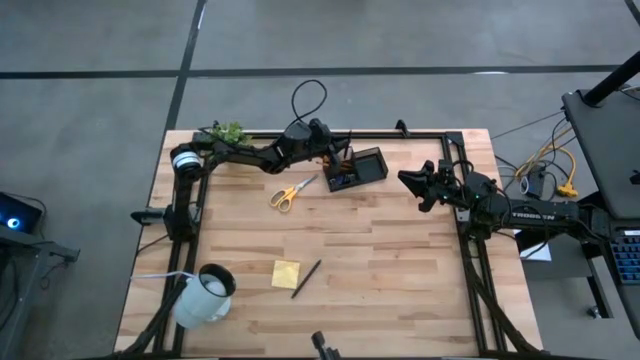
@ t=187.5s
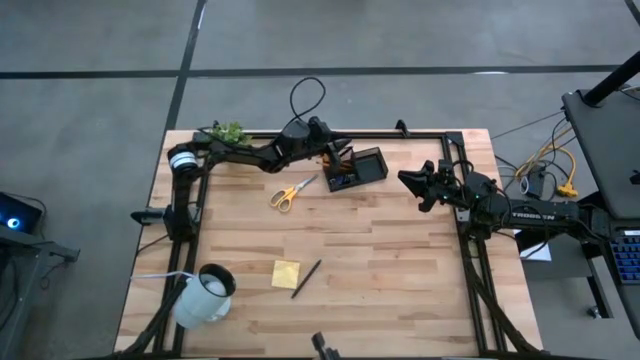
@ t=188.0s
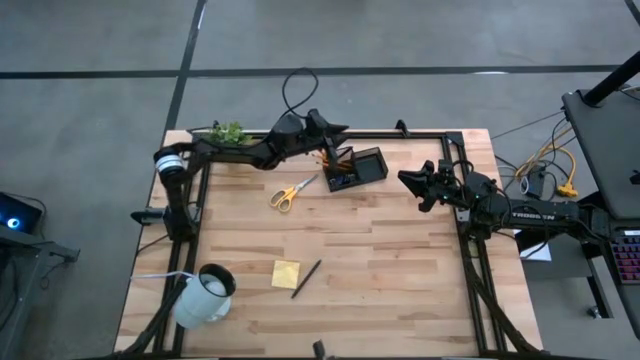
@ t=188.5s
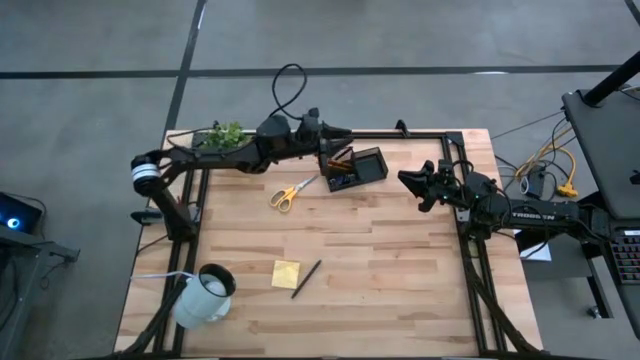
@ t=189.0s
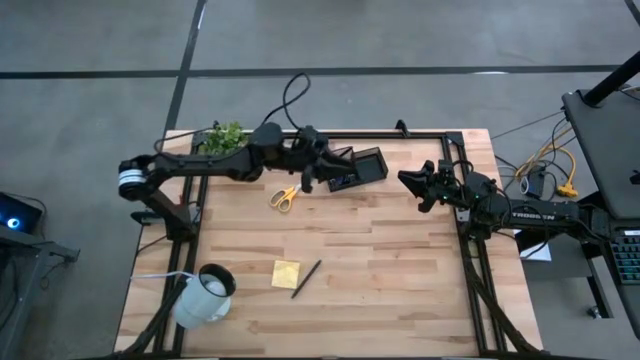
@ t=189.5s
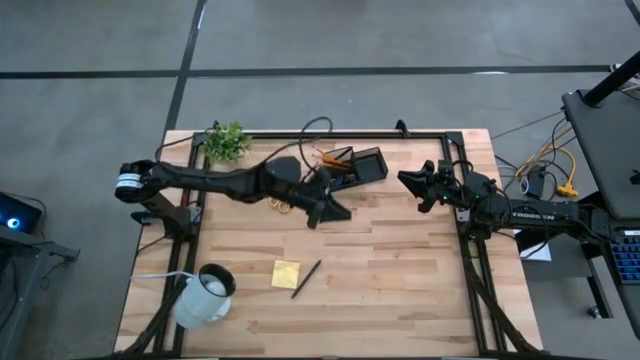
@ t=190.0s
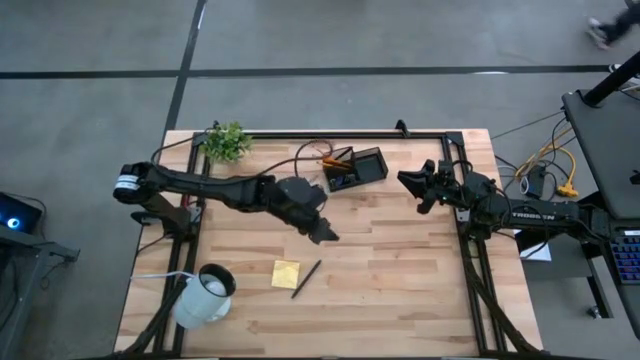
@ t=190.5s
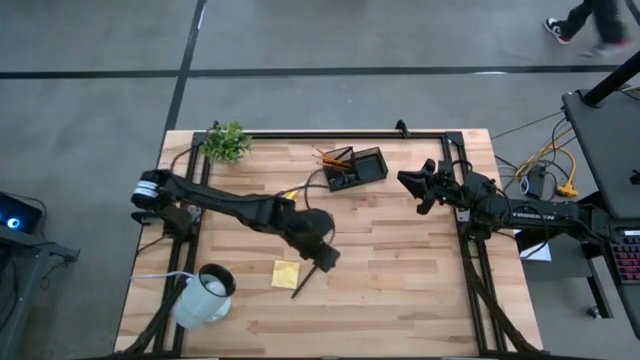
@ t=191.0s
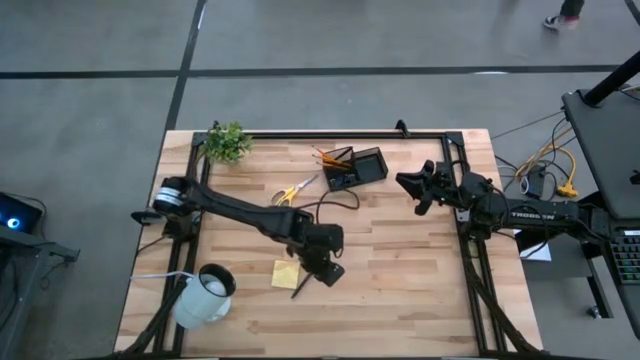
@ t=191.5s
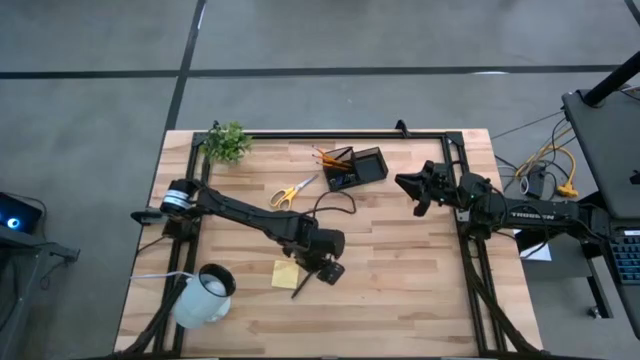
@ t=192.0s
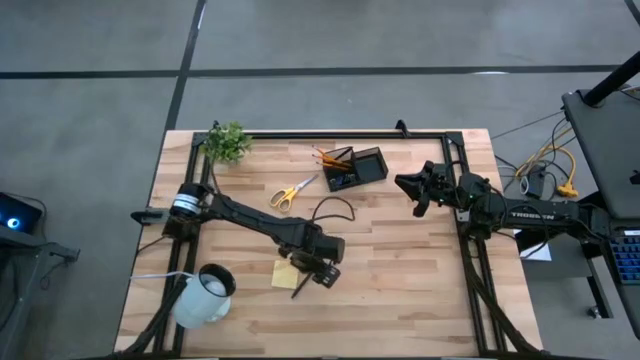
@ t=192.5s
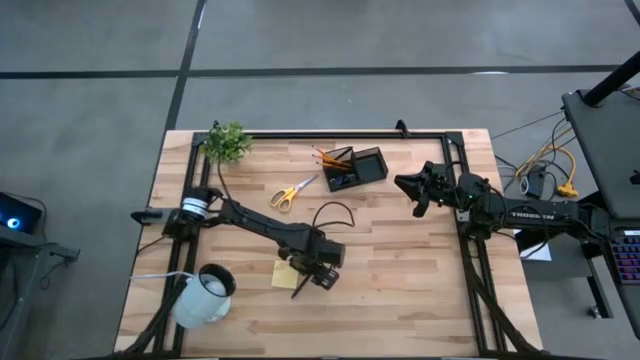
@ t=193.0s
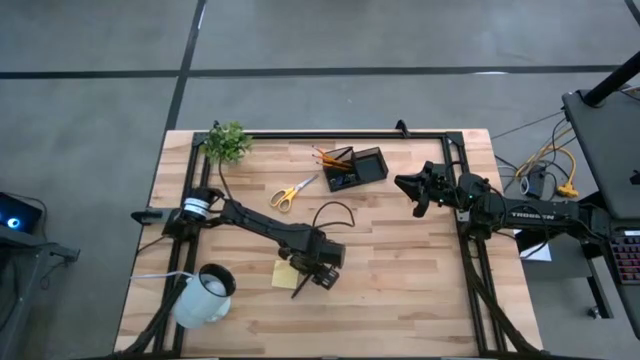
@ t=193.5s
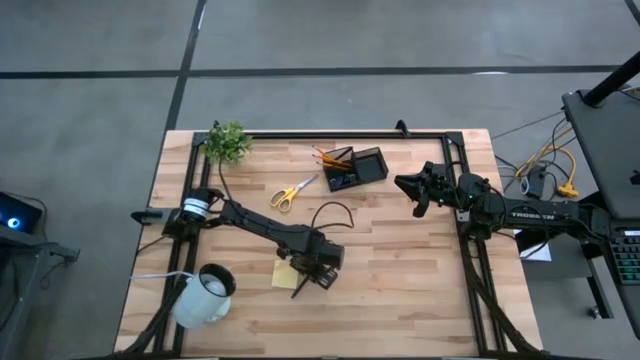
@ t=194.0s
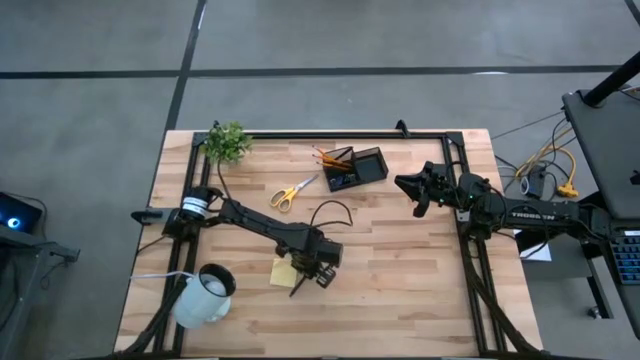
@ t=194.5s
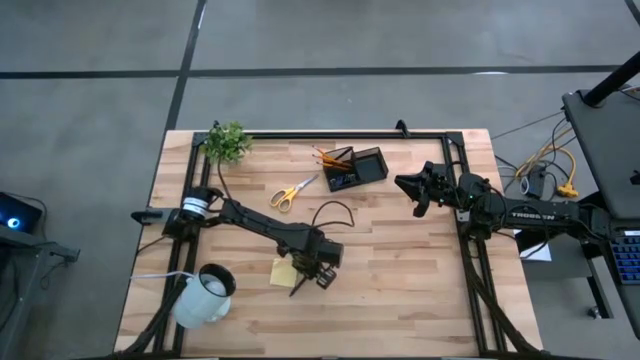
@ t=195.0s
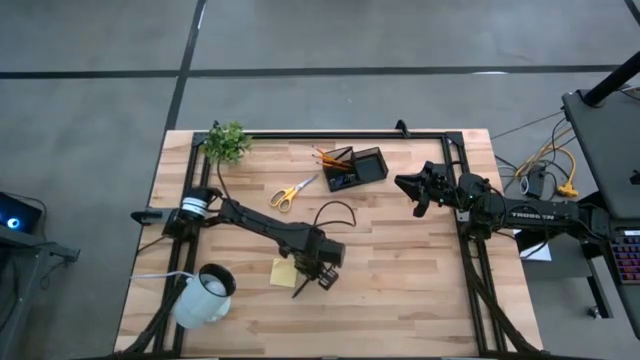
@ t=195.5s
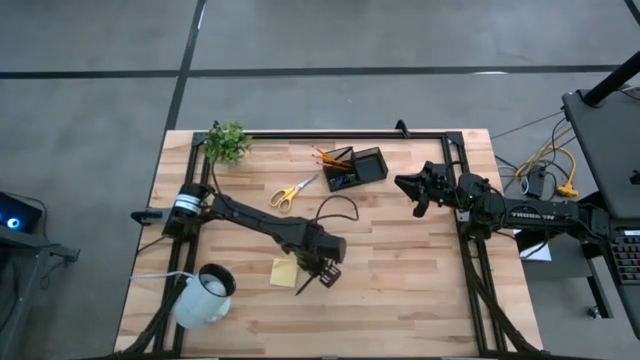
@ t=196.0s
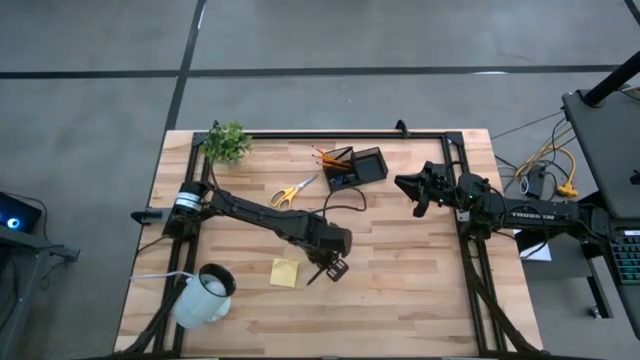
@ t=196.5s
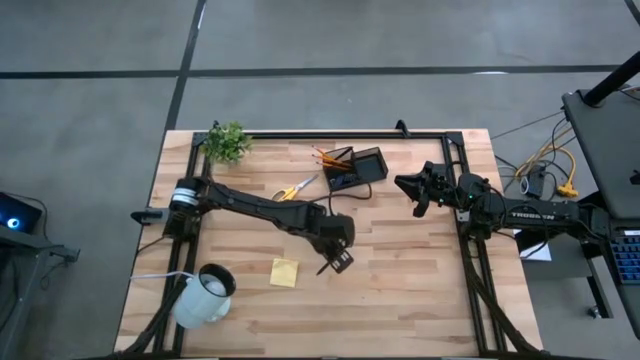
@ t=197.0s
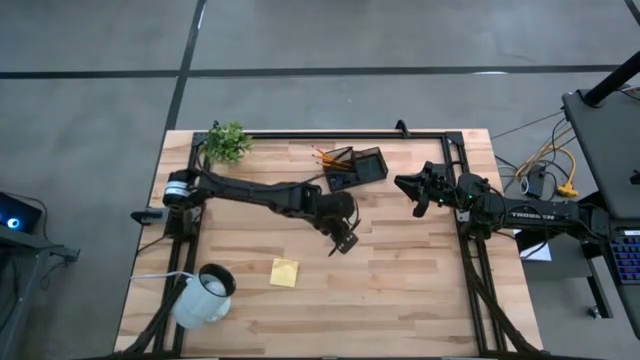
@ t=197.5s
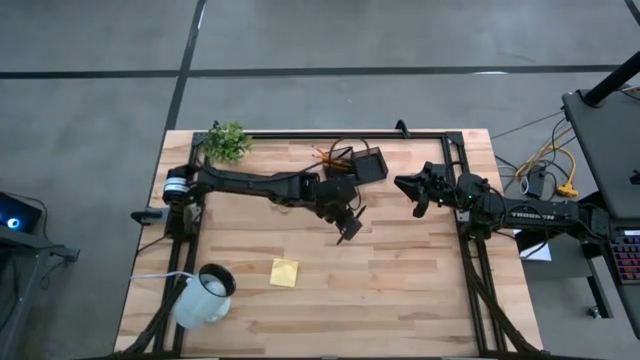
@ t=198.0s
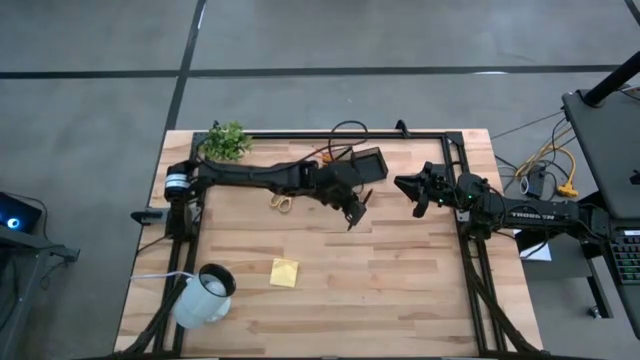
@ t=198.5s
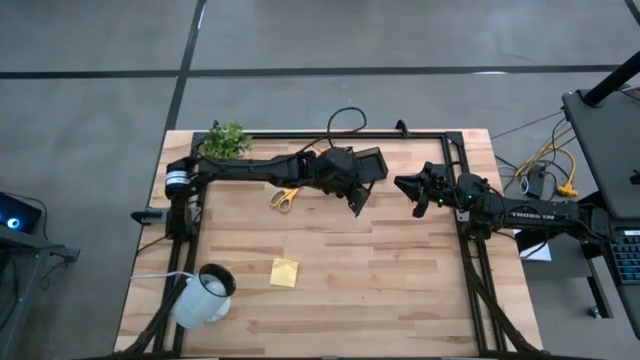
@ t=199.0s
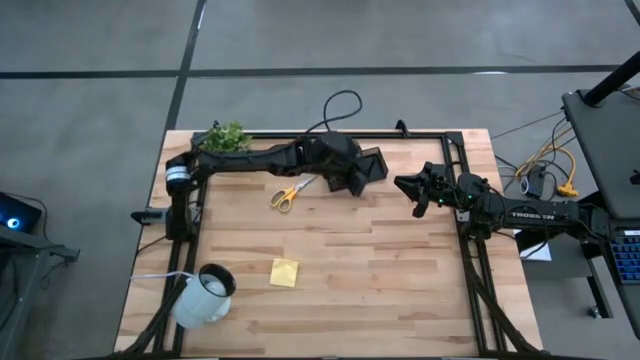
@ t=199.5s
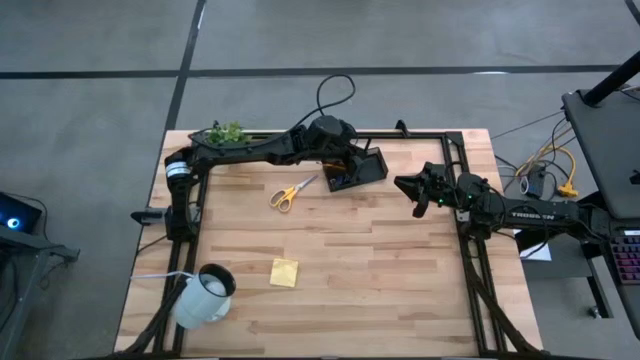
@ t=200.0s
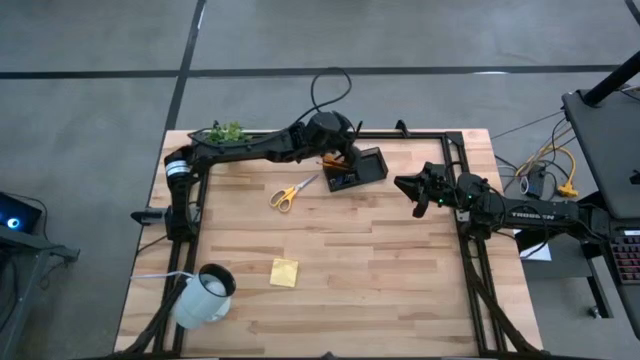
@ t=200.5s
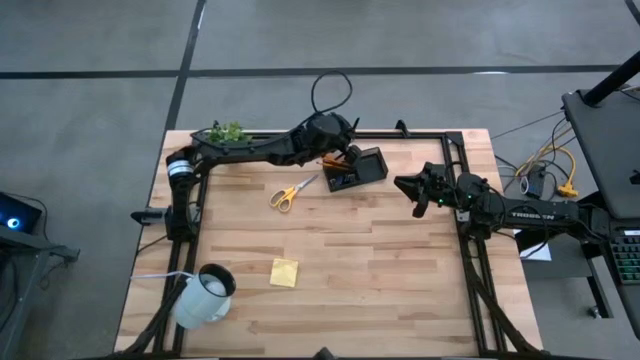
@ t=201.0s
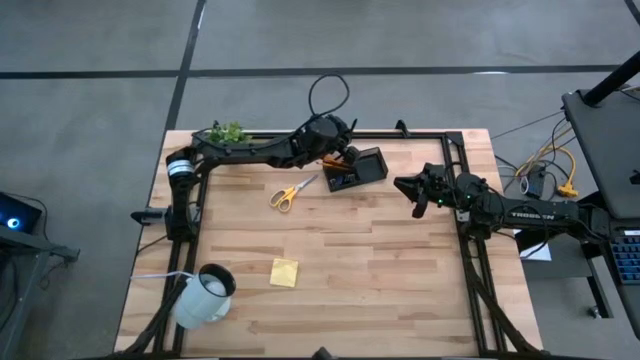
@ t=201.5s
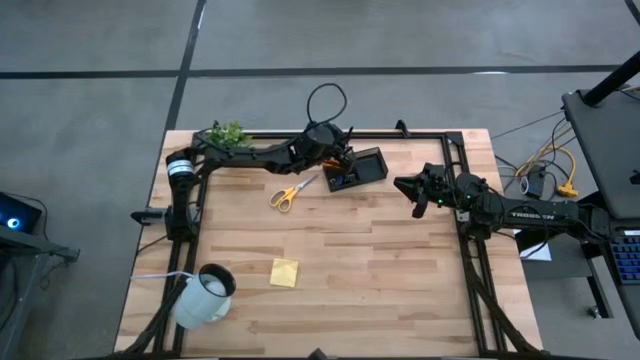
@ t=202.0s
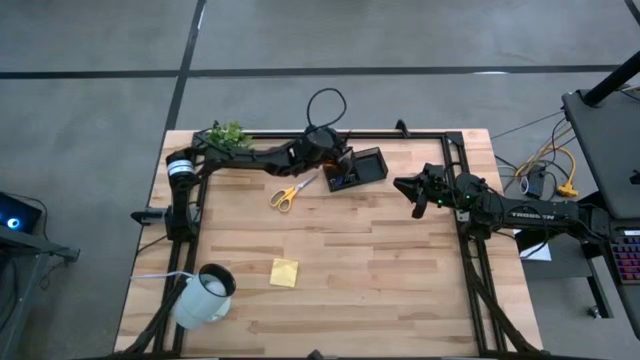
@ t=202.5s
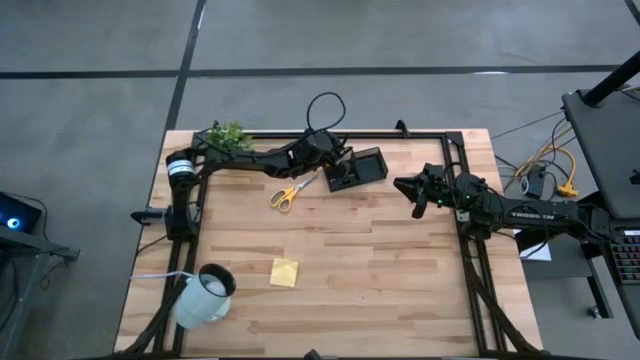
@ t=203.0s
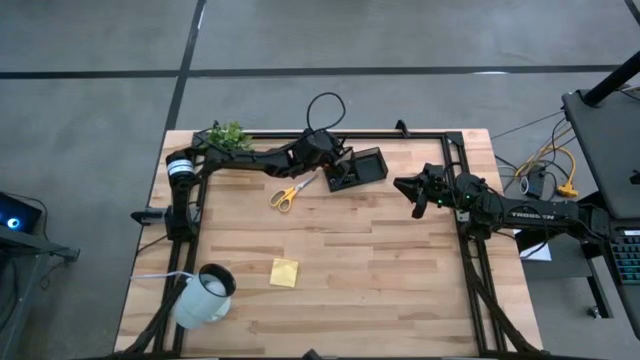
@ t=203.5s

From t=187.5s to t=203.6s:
Task: Pick and place office supplies into organizer
Put the pen into the desk organizer

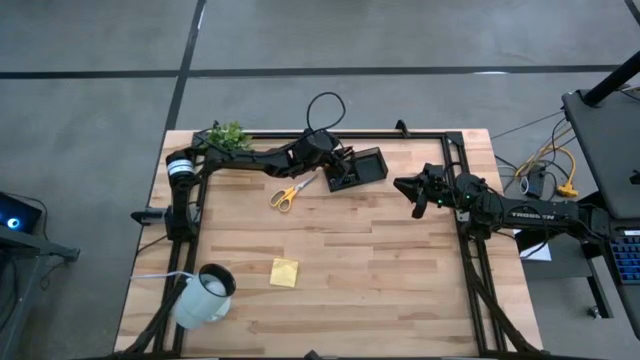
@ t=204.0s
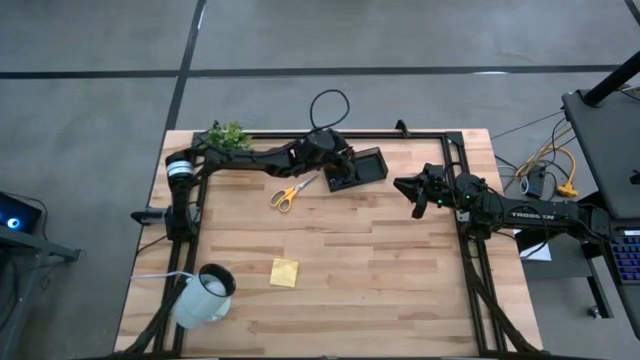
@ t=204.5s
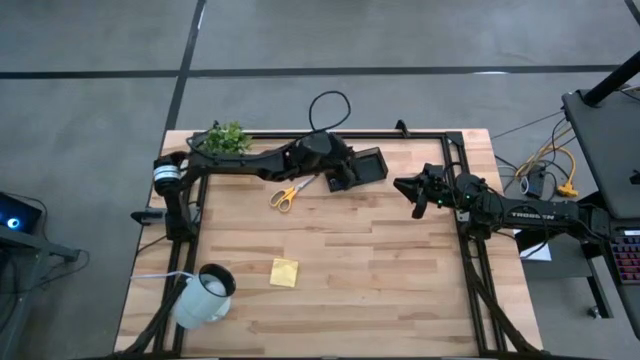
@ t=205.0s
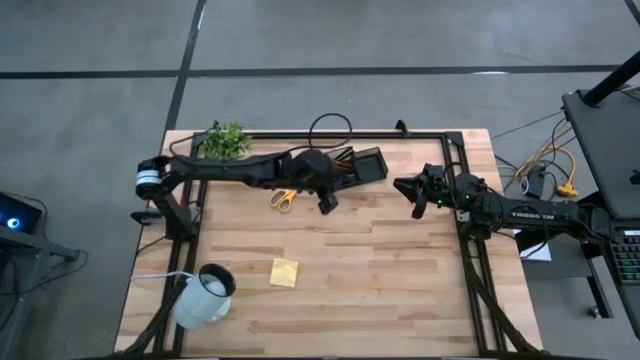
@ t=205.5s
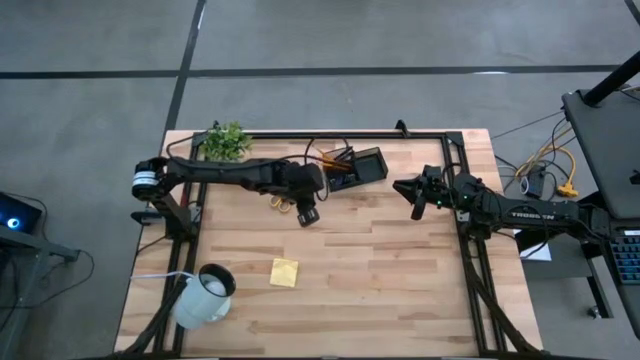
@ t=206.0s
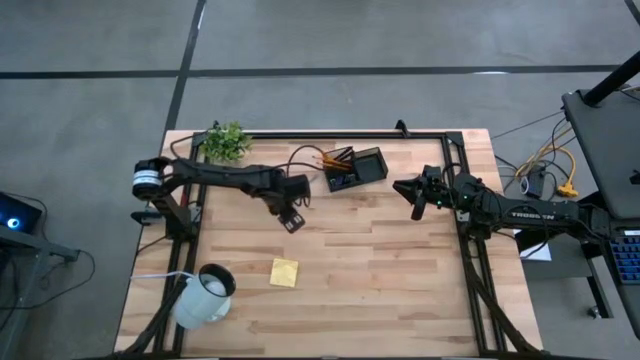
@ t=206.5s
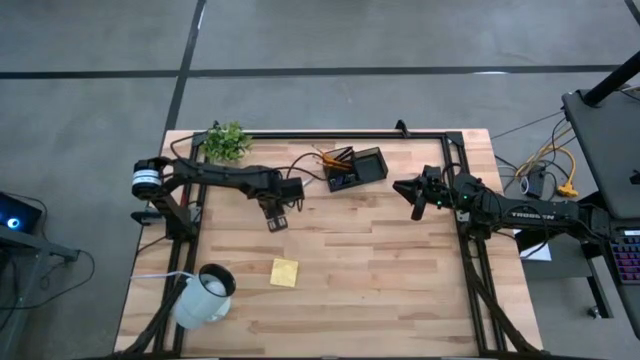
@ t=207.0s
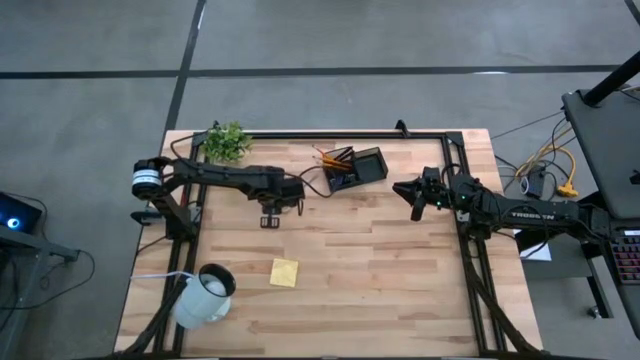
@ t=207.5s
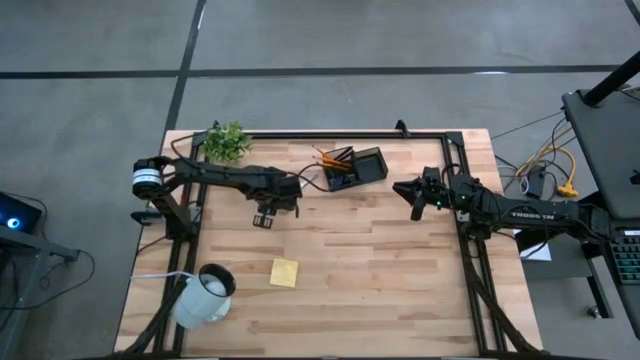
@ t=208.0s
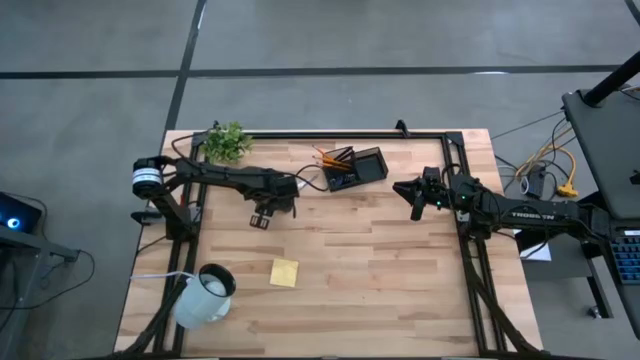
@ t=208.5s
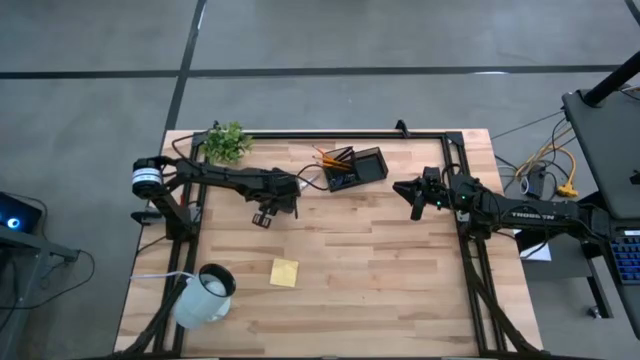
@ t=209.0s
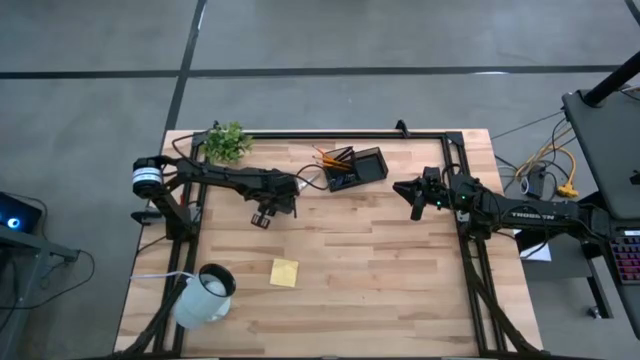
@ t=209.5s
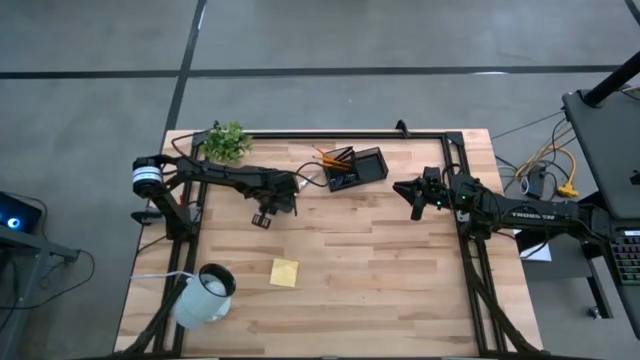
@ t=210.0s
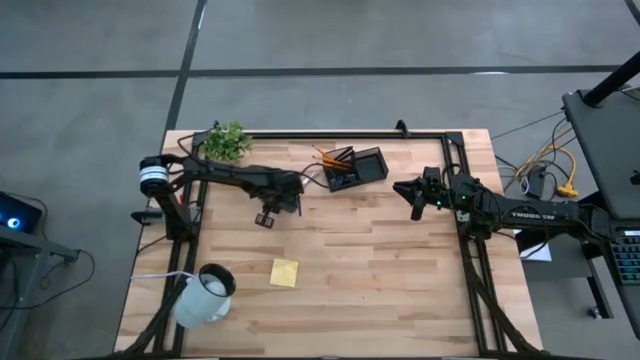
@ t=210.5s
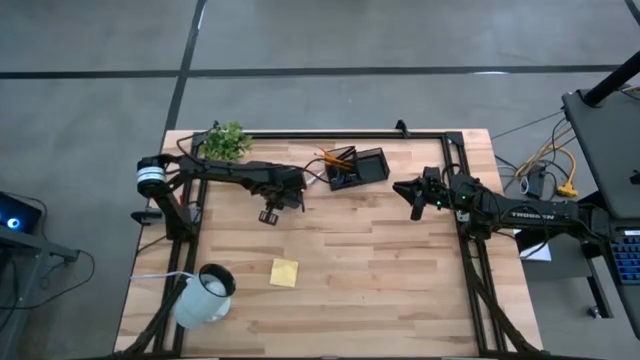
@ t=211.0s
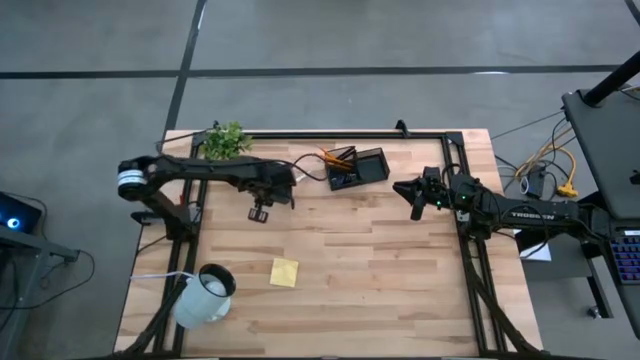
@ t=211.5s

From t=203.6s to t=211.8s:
Put the scissors into the desk organizer
